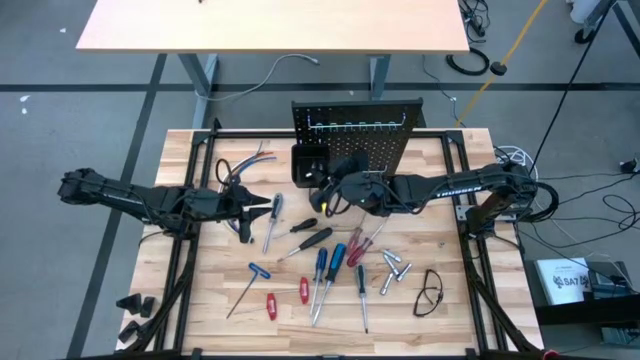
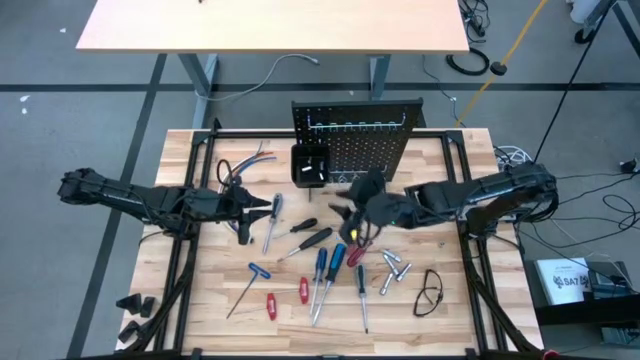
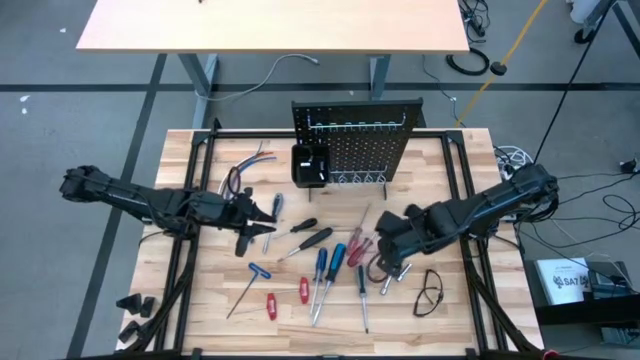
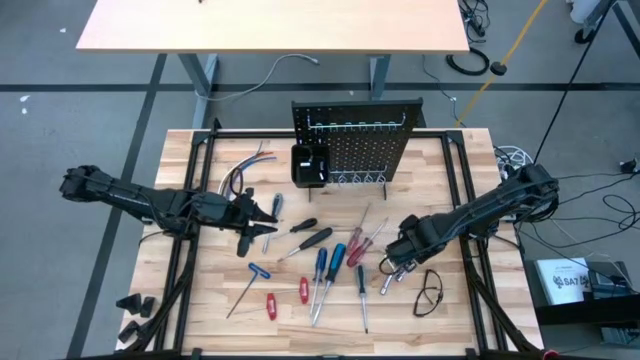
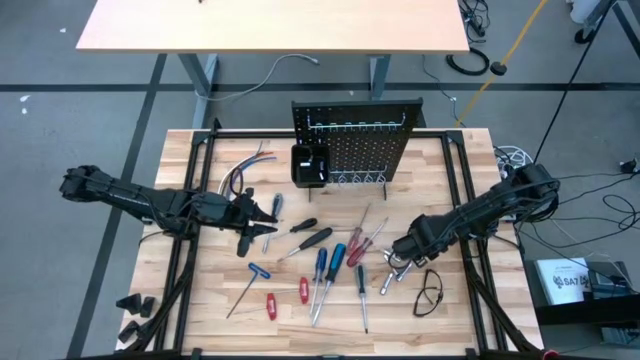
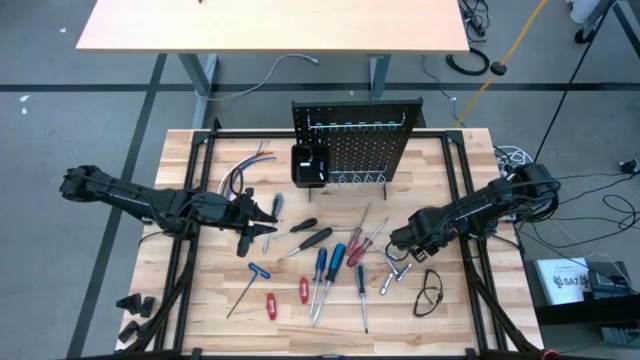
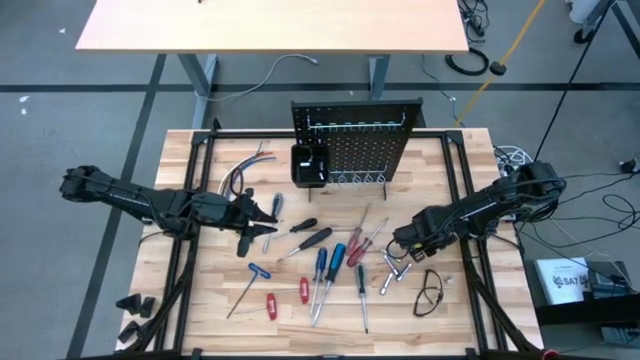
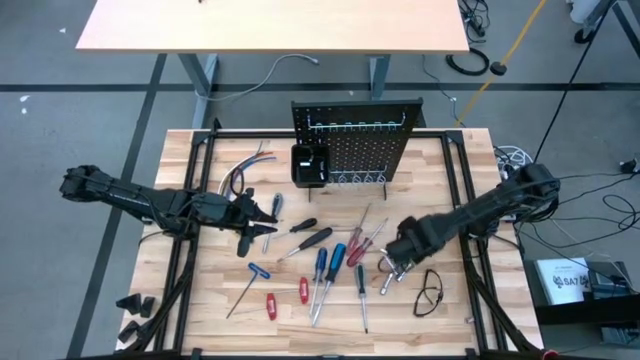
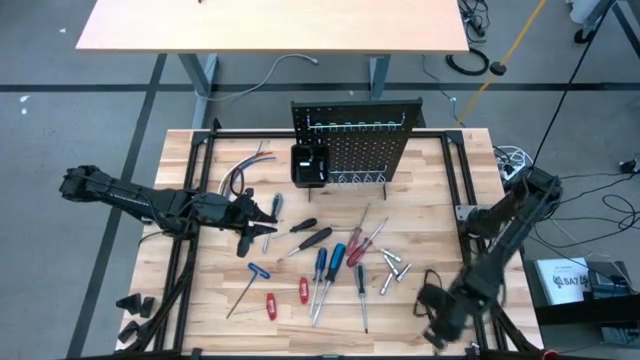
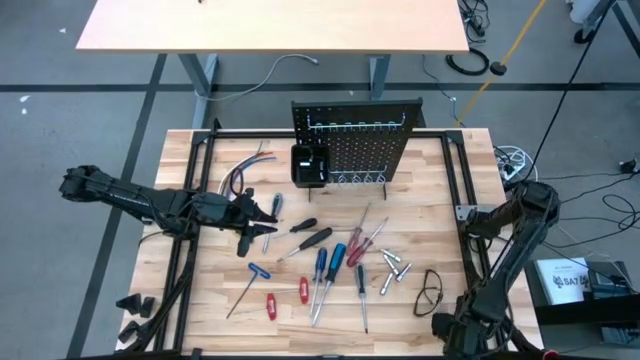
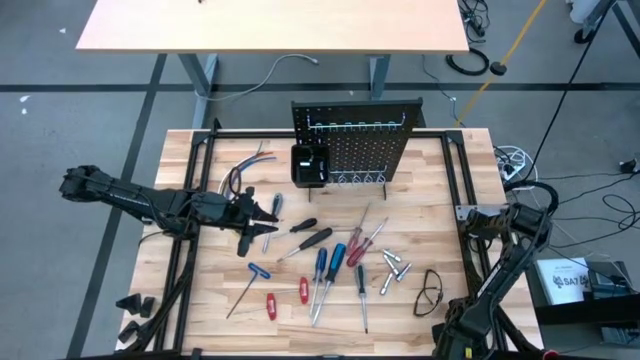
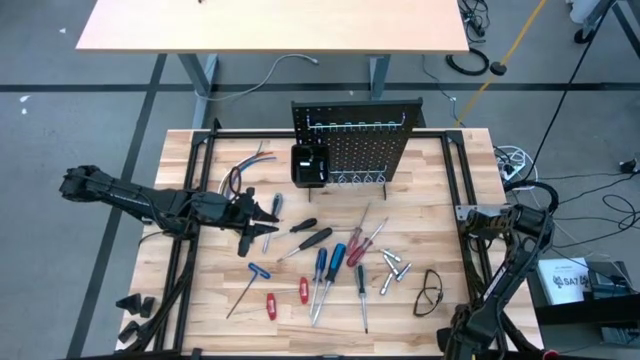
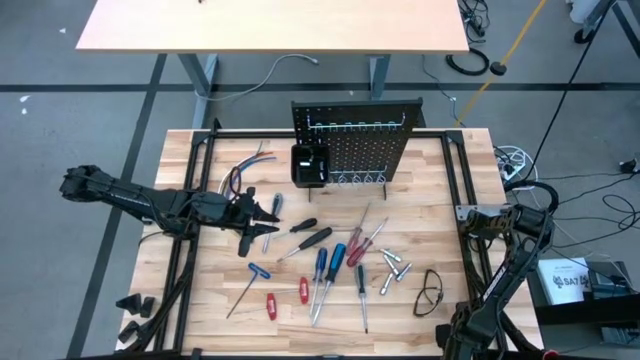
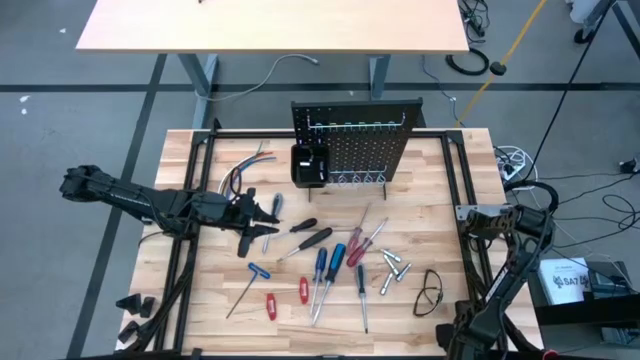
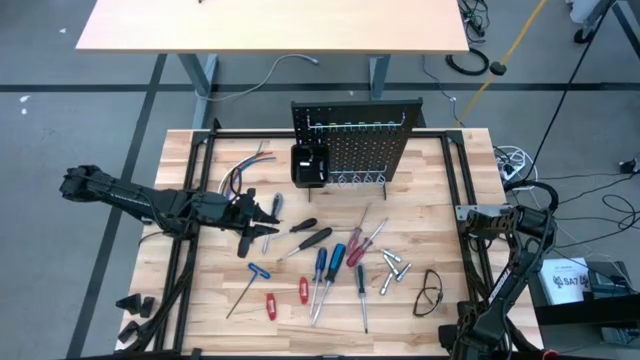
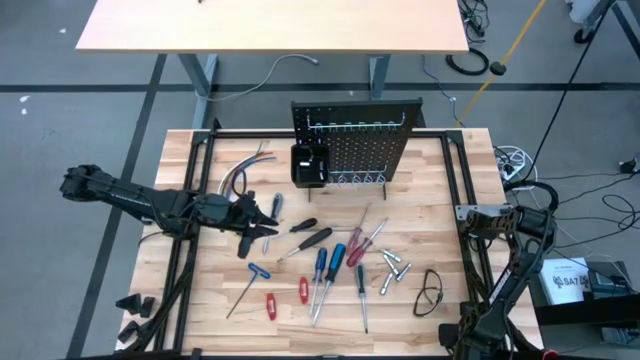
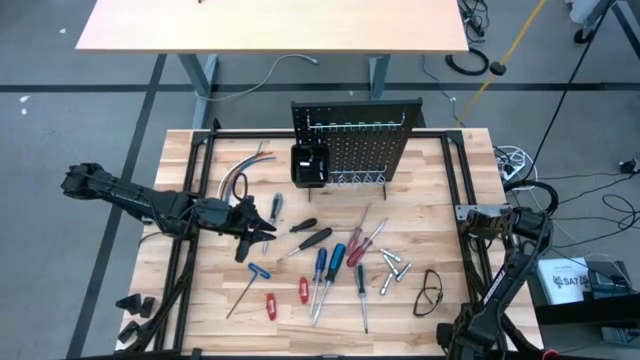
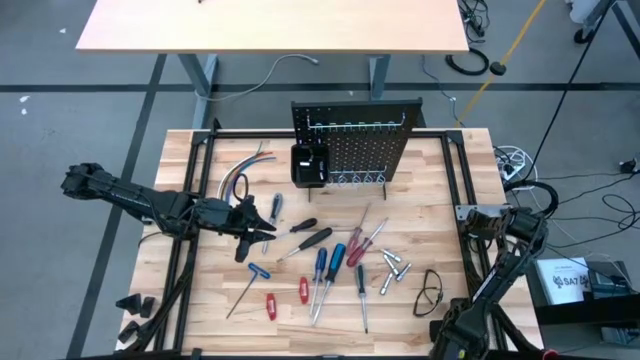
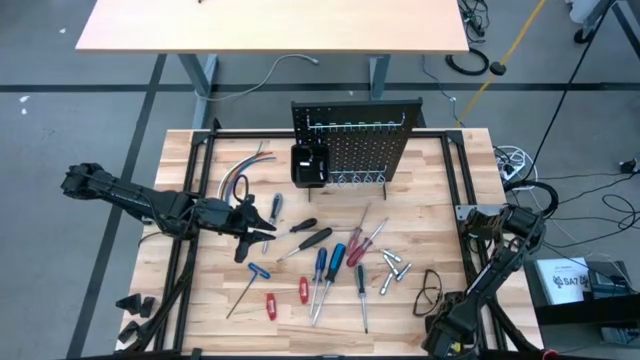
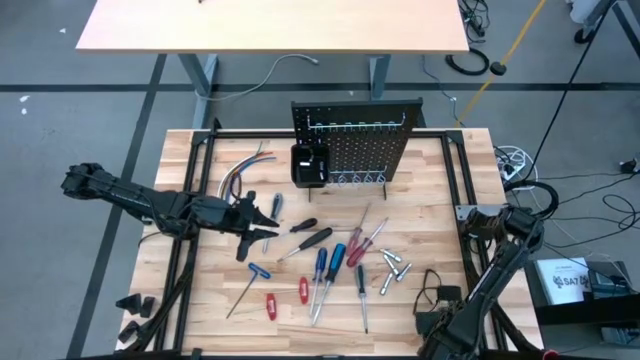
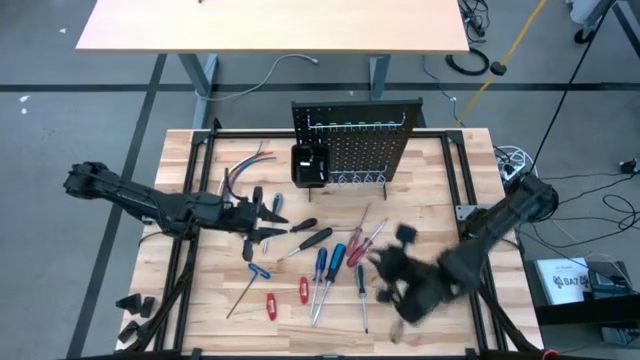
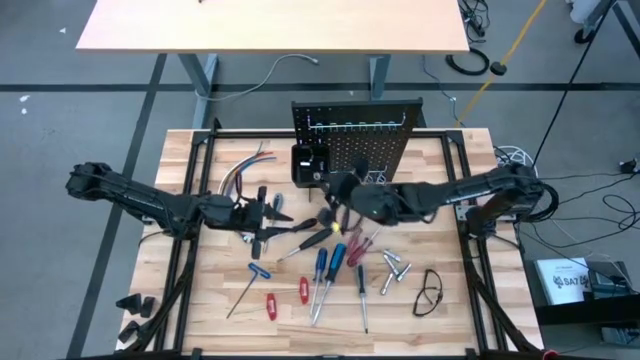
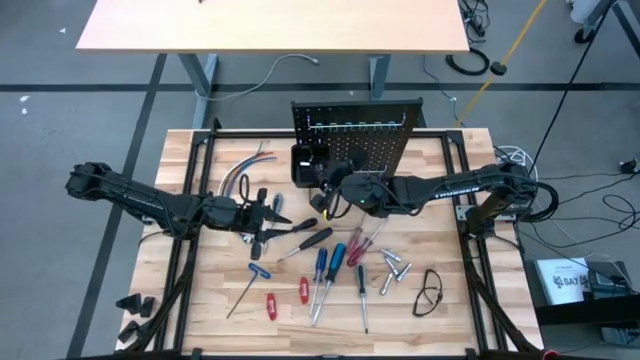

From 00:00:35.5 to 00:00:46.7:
Task: Hang tools onto peg board
Put the socket in the black bin on the peg board

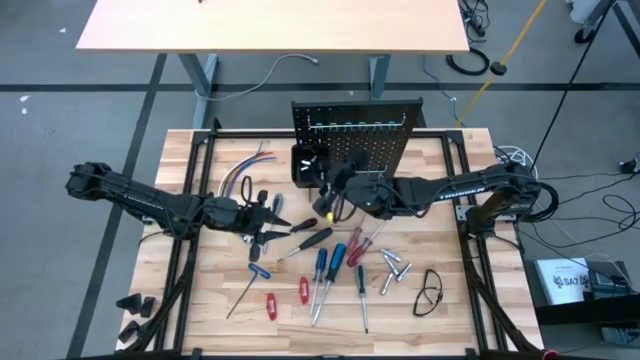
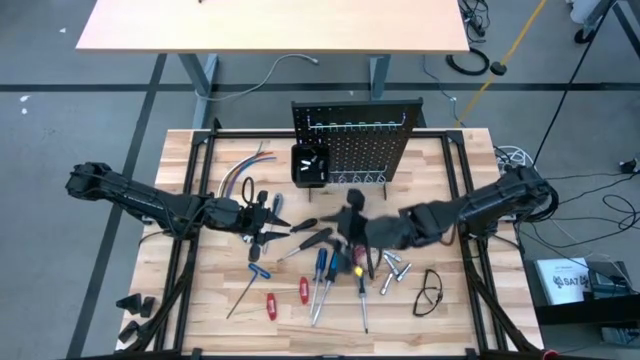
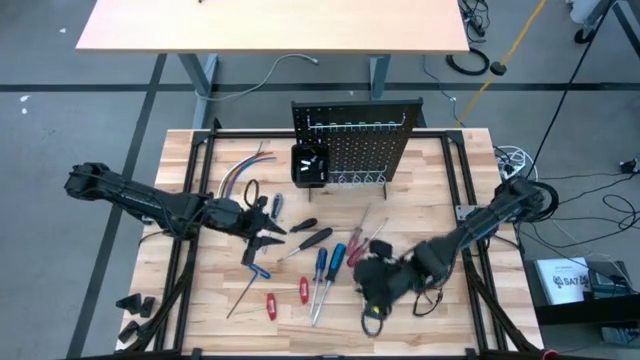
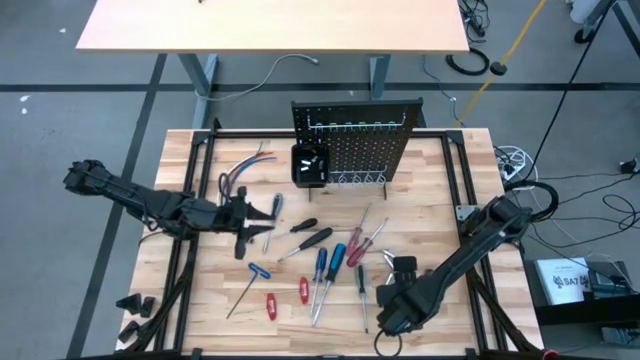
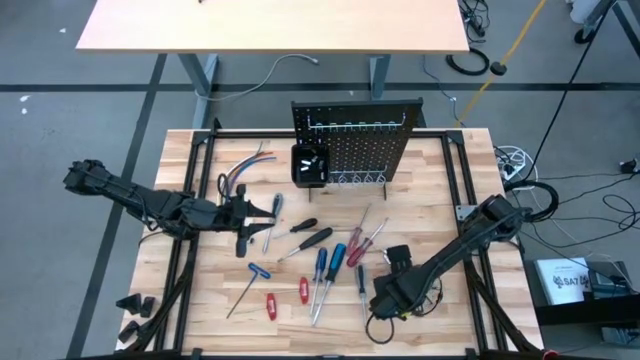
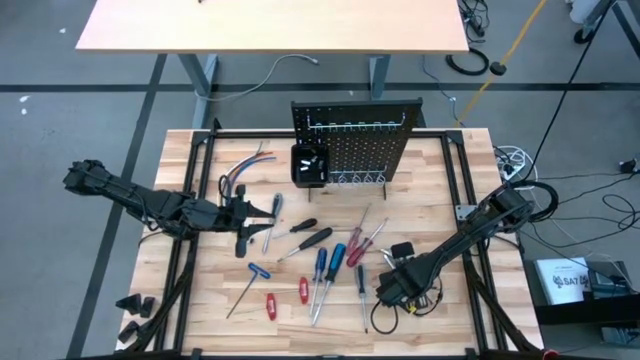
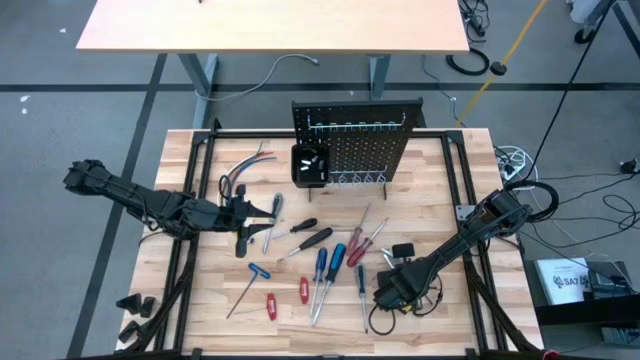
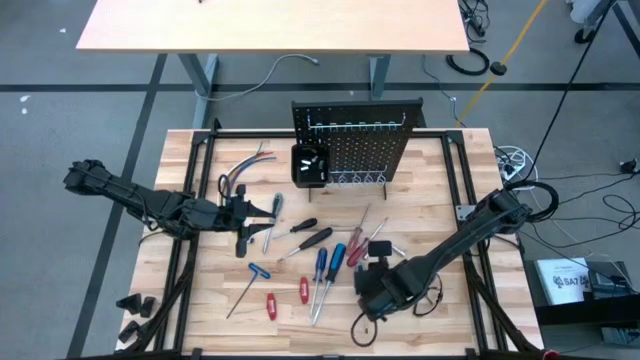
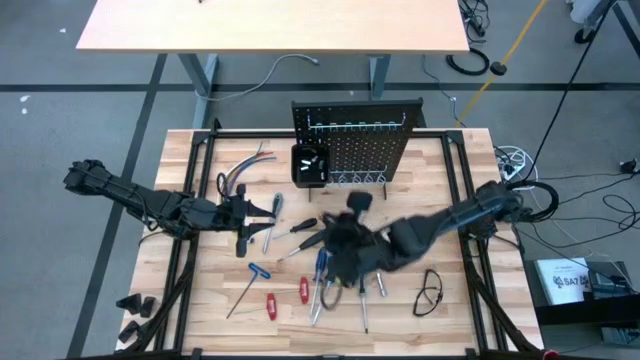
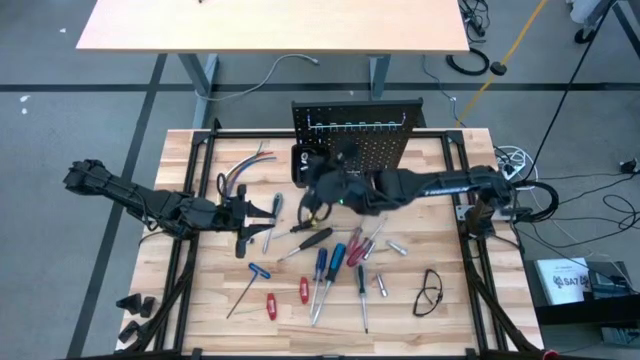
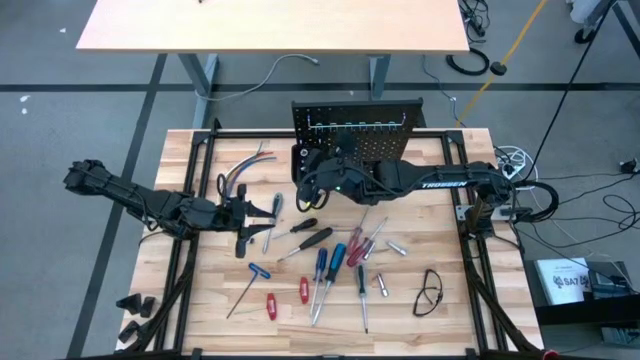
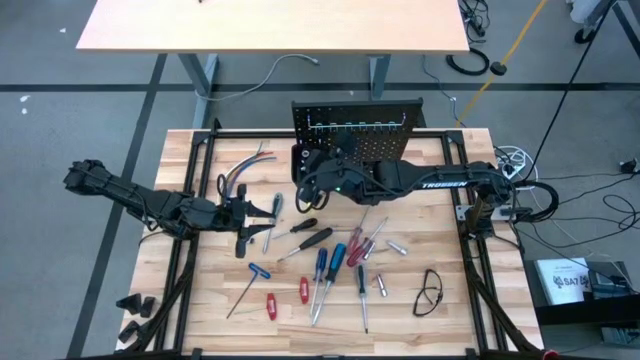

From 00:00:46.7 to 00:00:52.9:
Put the extension bar in the black bin on the peg board

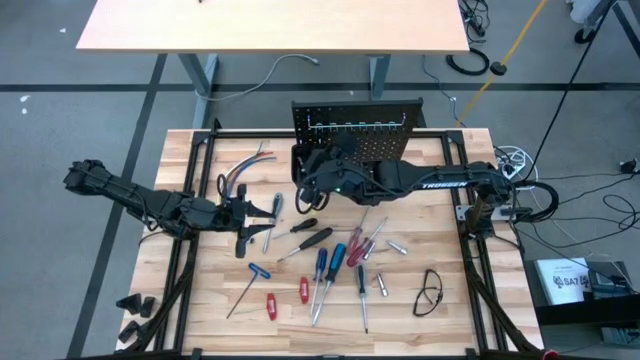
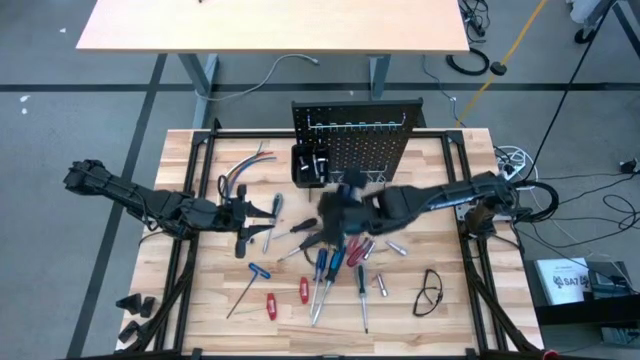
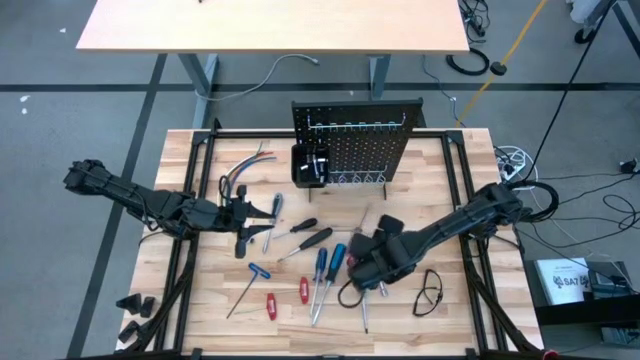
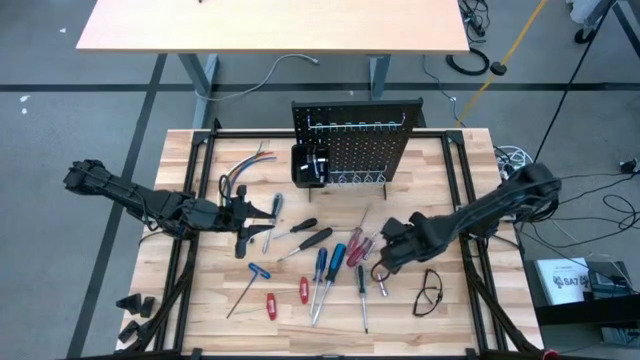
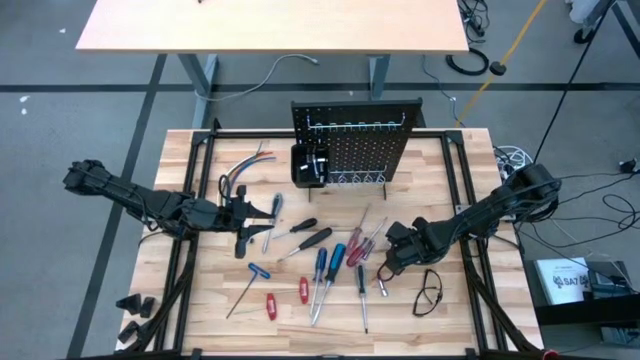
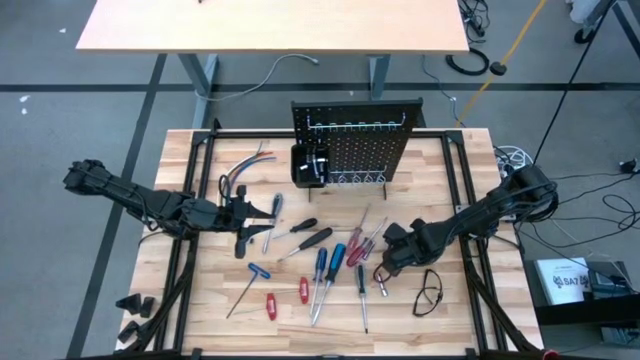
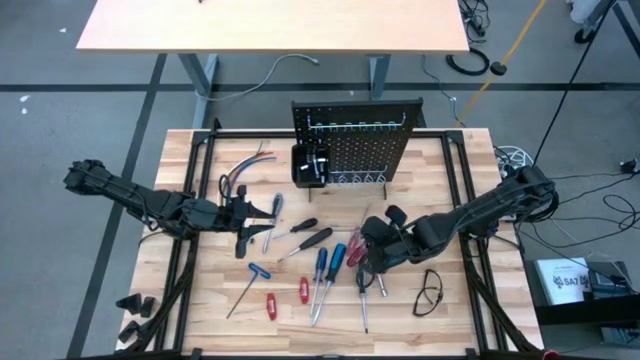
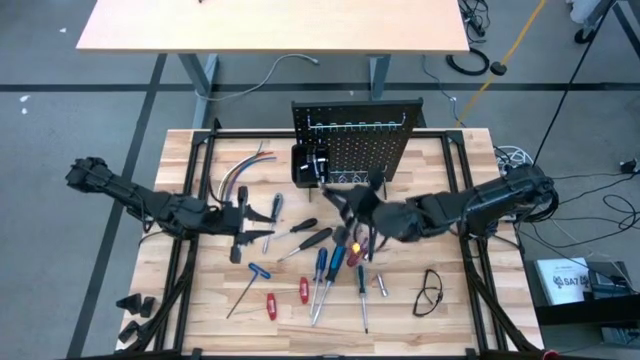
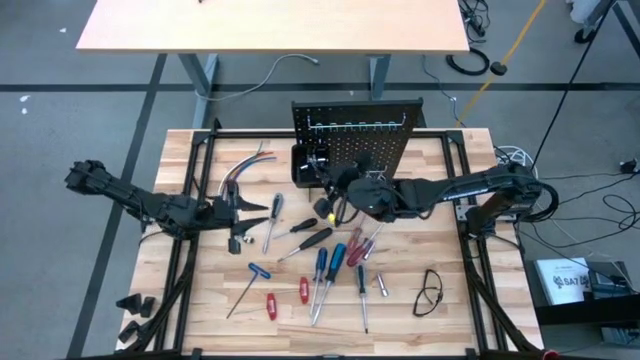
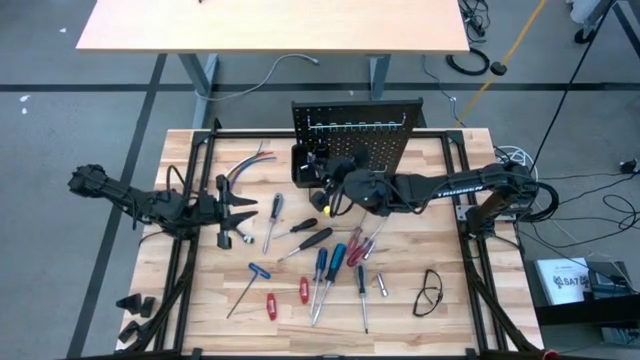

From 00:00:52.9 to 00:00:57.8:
Put the extension bar in the black bin on the peg board
